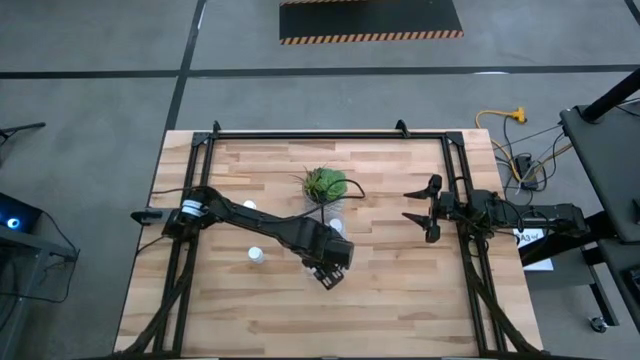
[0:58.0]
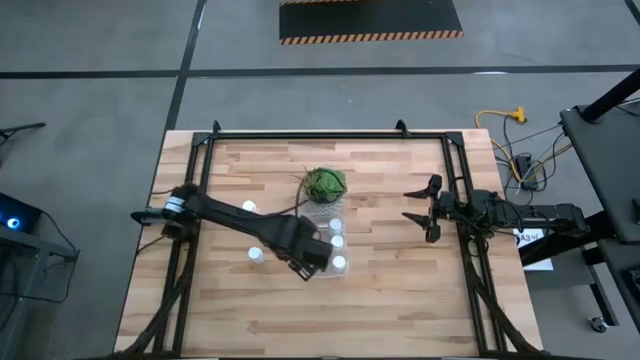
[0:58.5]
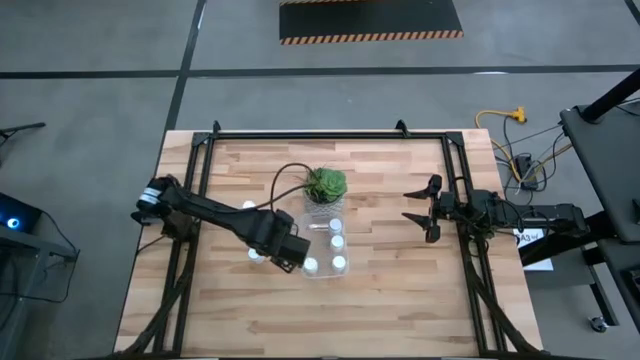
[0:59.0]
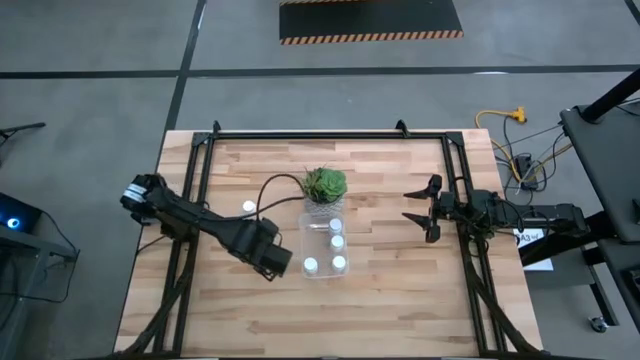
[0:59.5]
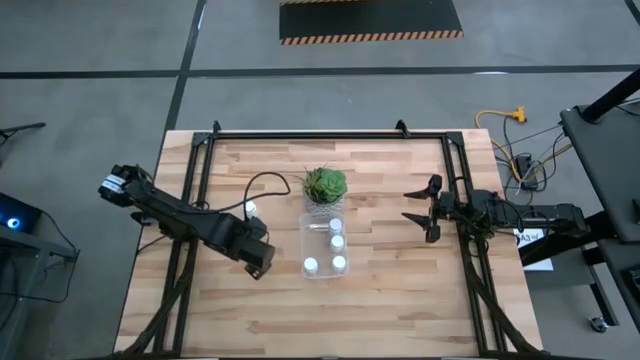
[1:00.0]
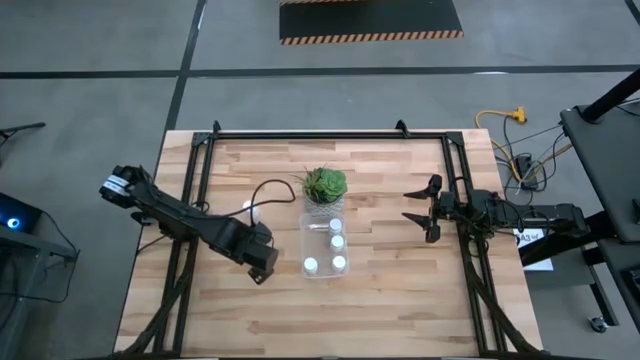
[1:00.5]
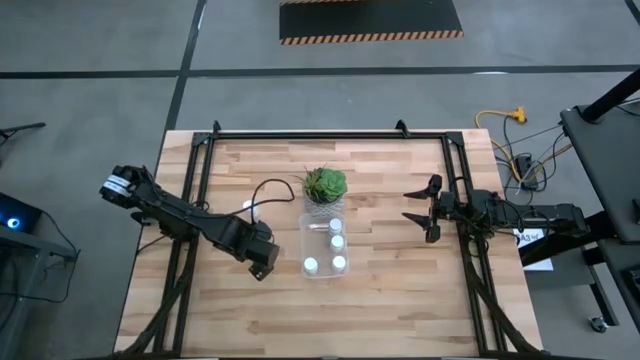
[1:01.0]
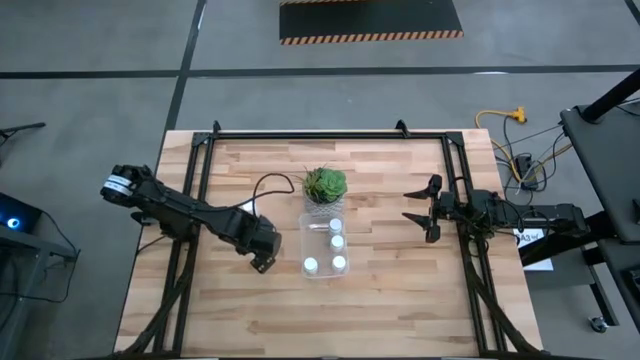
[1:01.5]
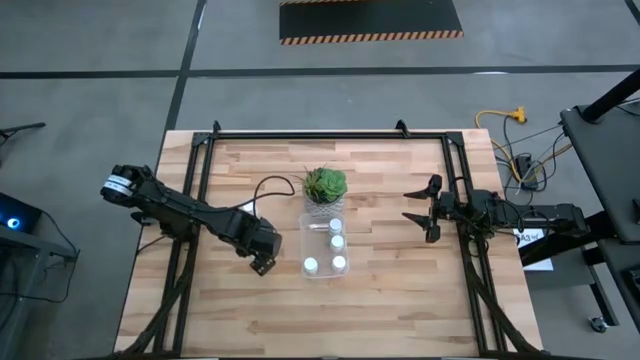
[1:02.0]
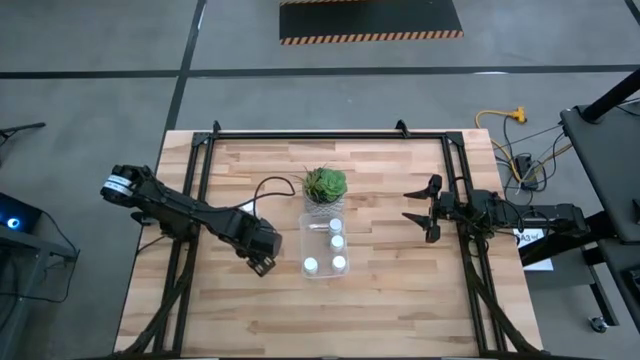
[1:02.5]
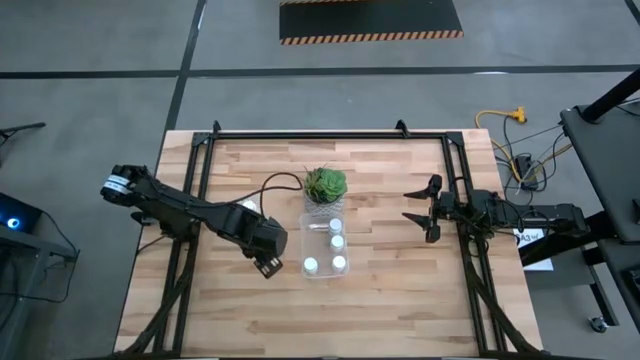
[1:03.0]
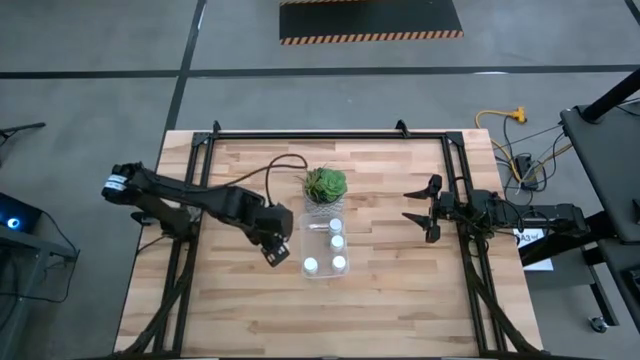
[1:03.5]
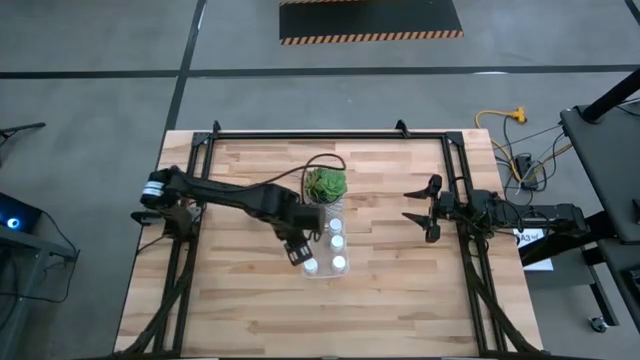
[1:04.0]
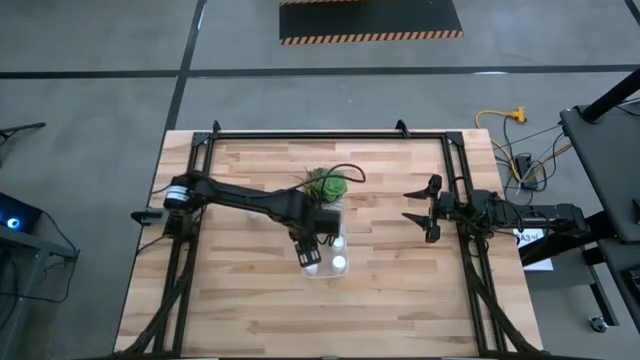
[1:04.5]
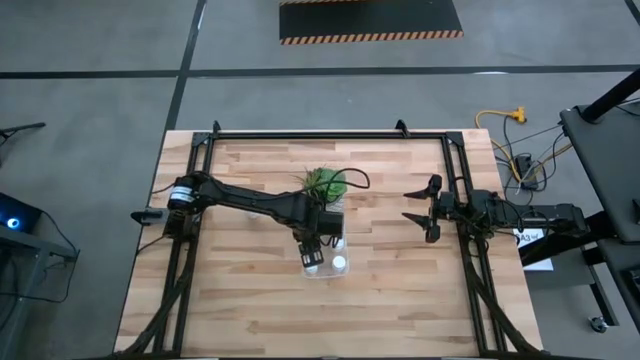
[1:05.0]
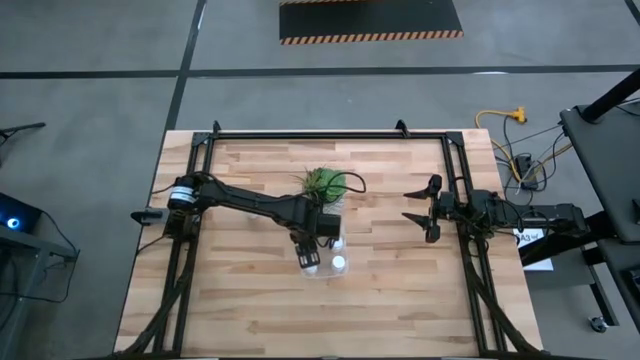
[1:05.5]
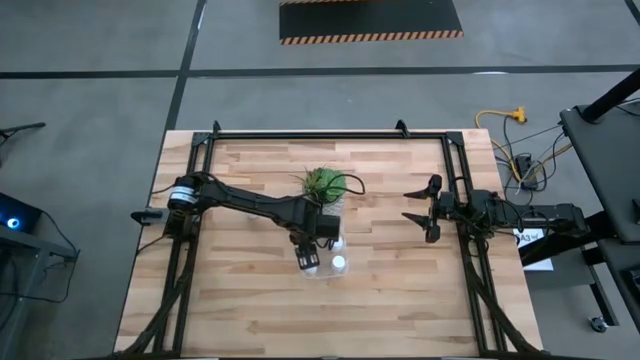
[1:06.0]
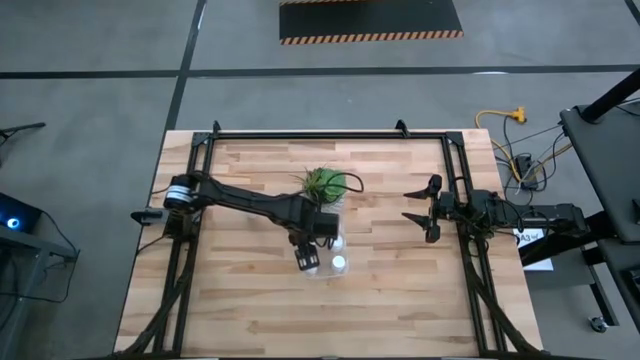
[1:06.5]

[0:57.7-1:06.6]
Task: Pick and place pill bottles into a basket
Put the bottom pill bottle into the bin

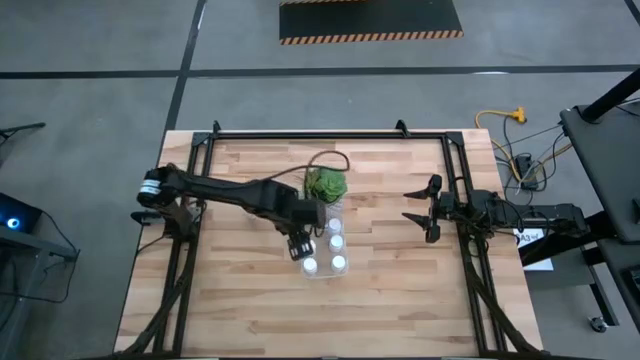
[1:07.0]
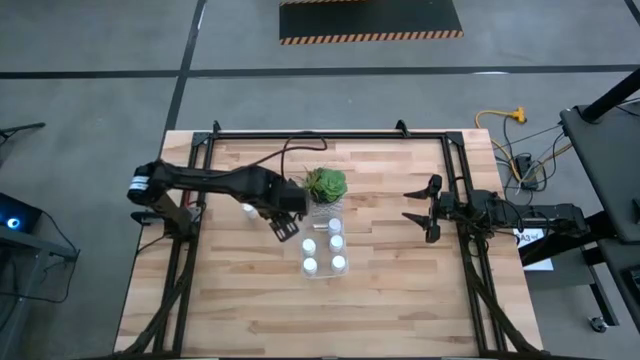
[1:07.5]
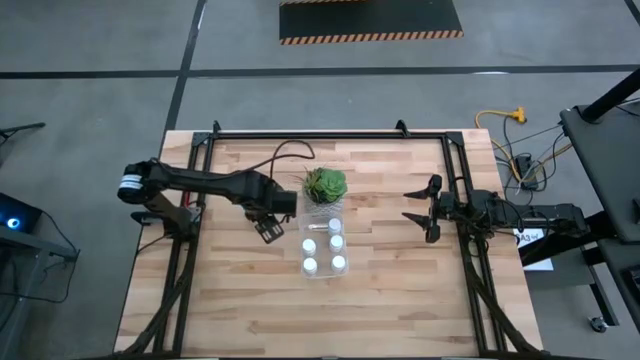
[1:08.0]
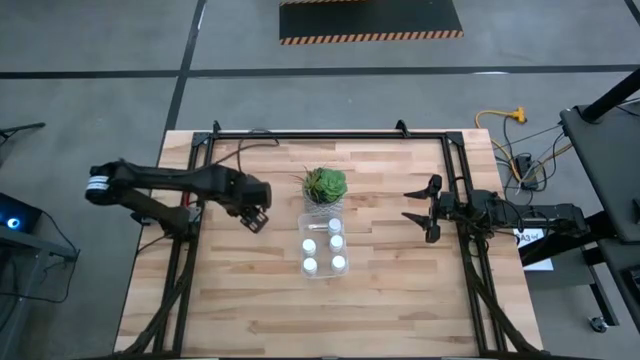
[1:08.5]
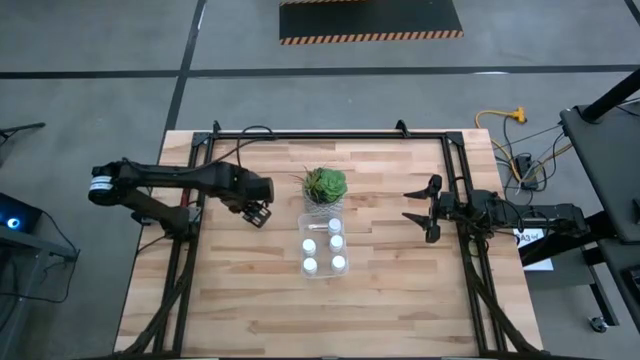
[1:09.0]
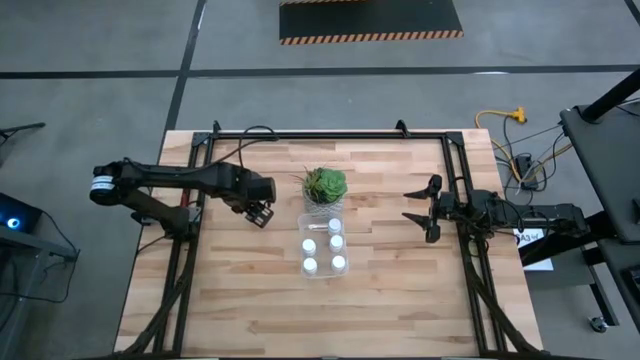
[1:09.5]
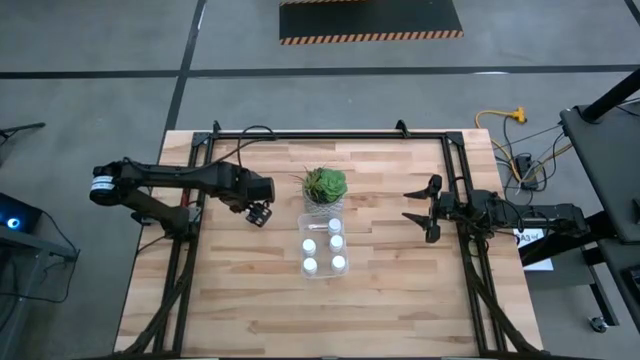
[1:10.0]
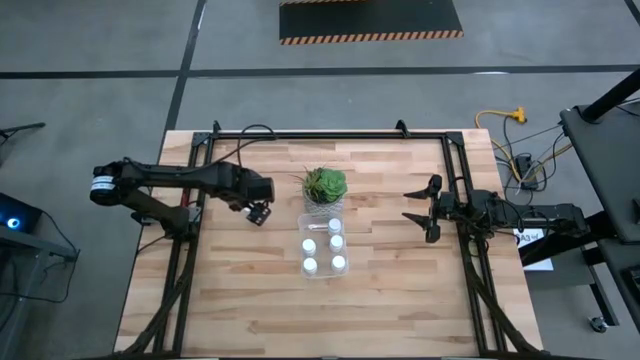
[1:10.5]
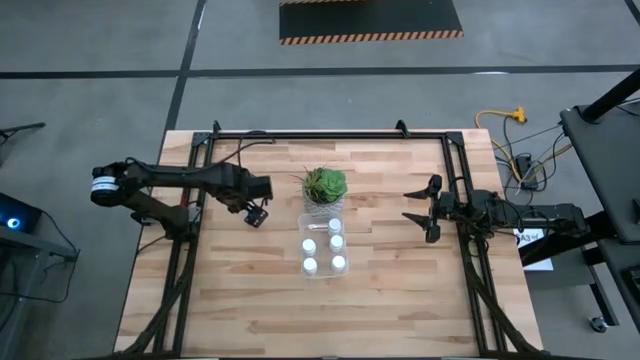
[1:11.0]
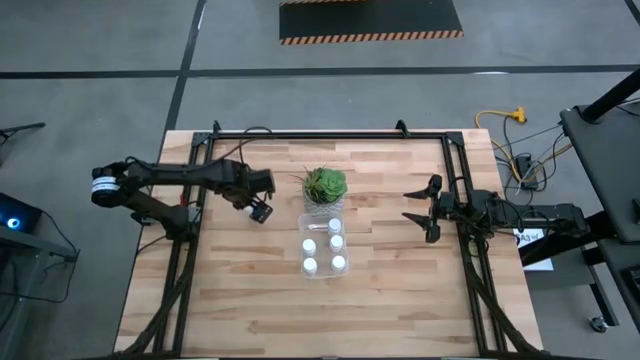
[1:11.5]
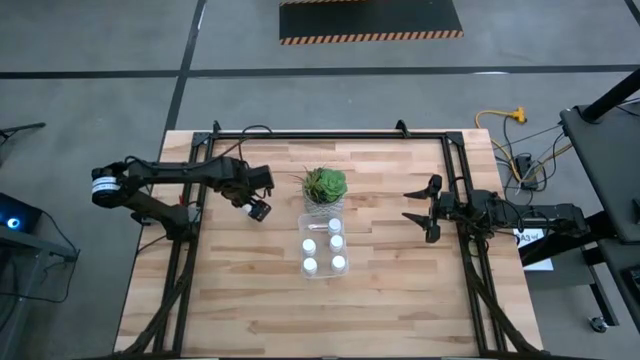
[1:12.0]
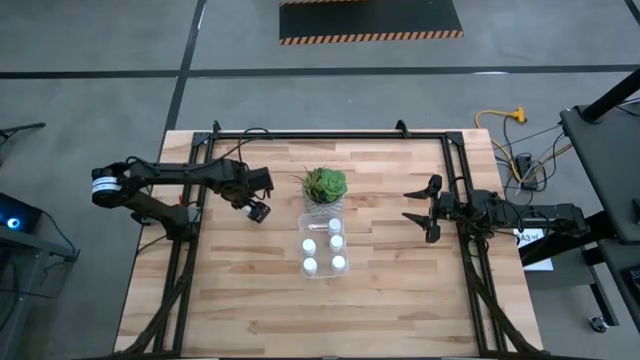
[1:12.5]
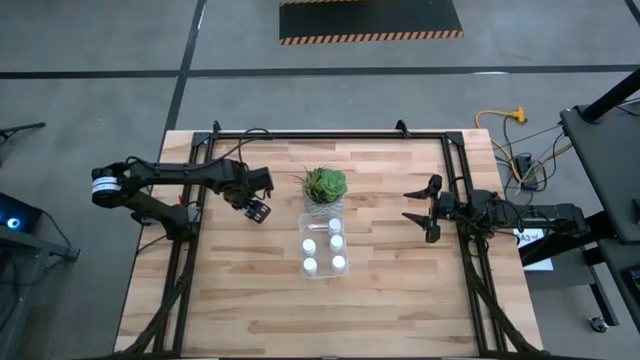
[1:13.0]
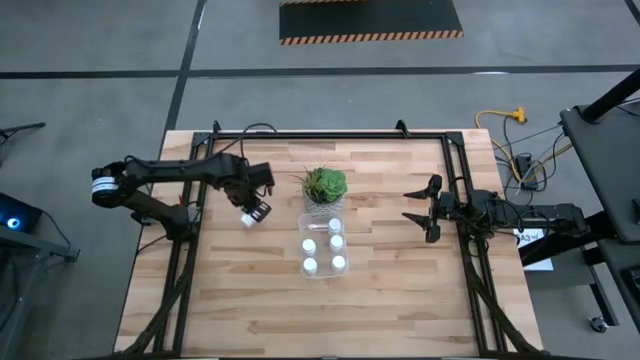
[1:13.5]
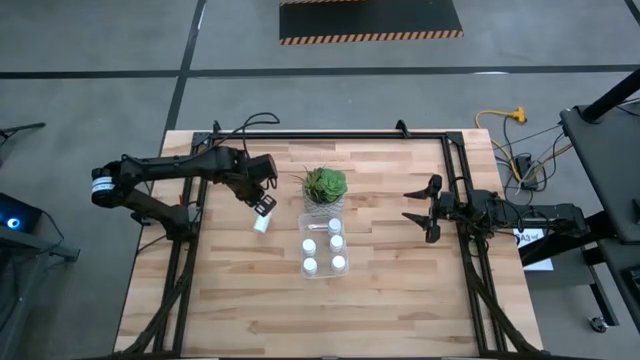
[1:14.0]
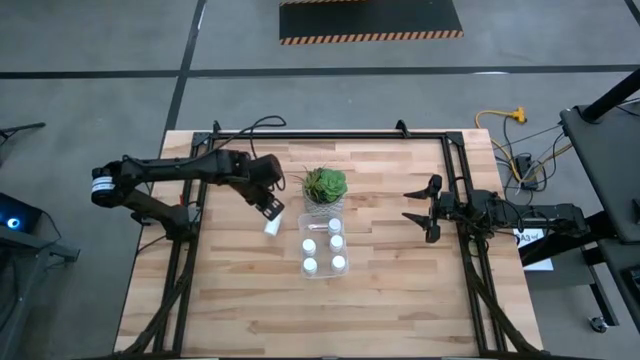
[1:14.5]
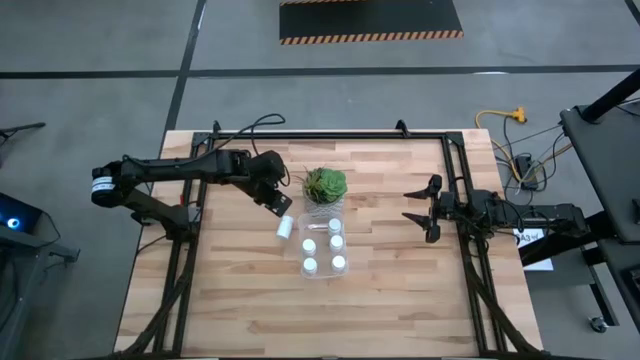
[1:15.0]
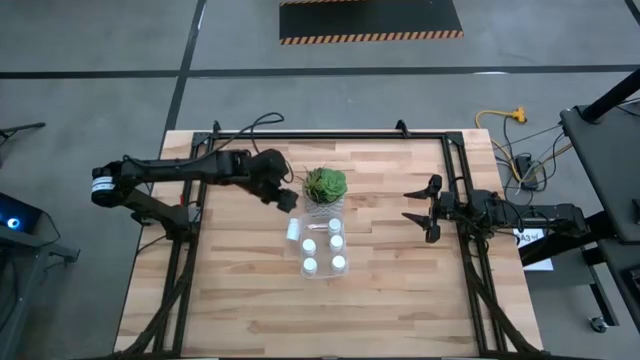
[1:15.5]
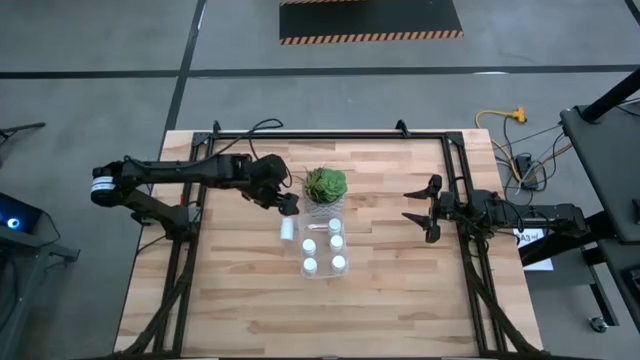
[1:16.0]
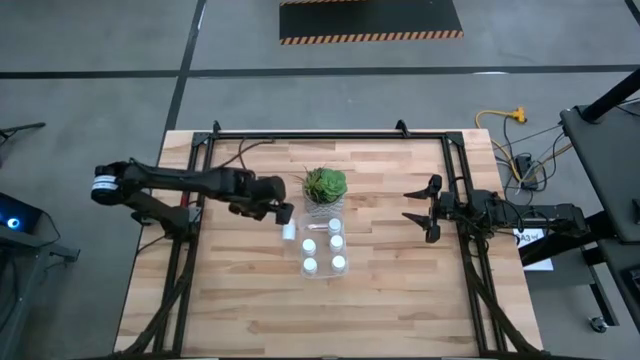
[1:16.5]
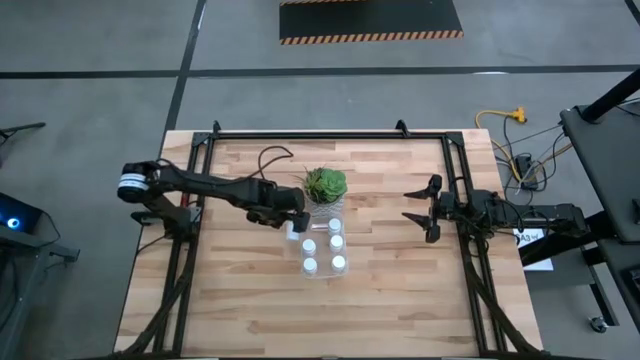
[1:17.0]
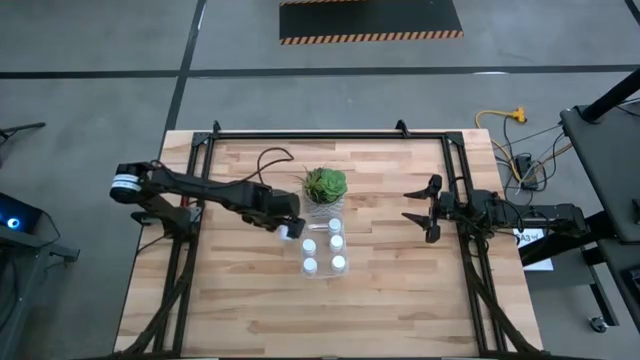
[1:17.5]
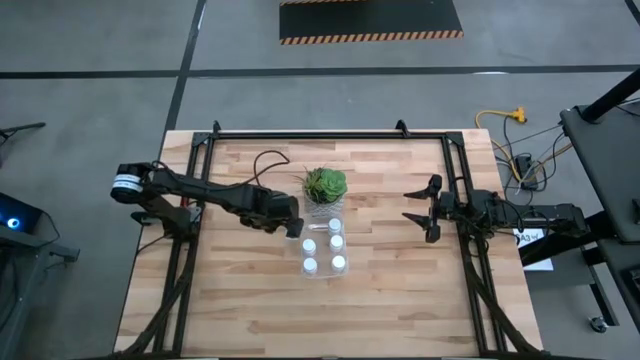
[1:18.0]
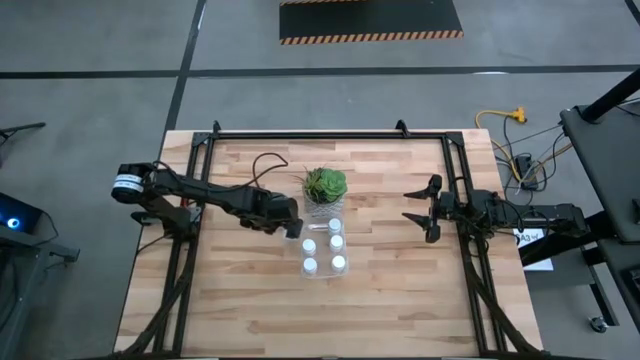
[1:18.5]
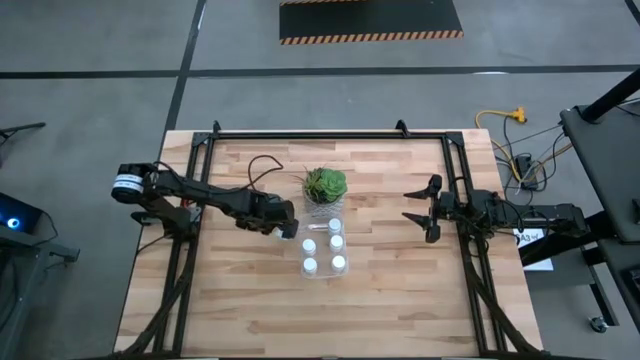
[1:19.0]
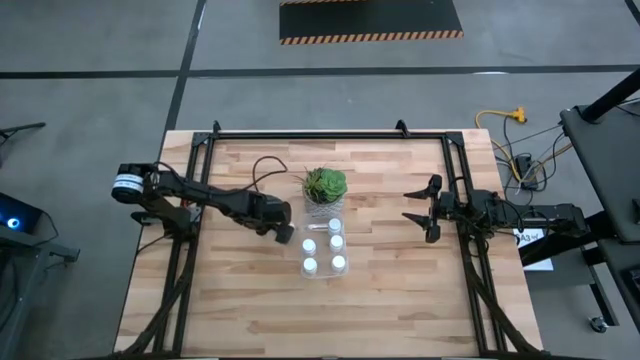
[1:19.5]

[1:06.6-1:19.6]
Put the pill bottle into the bin
